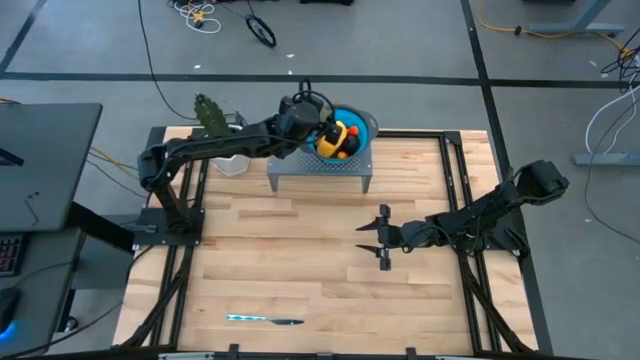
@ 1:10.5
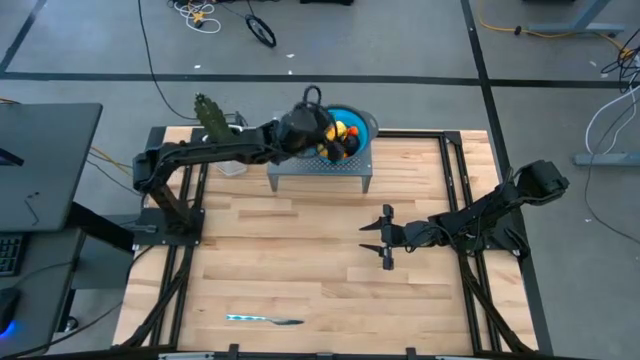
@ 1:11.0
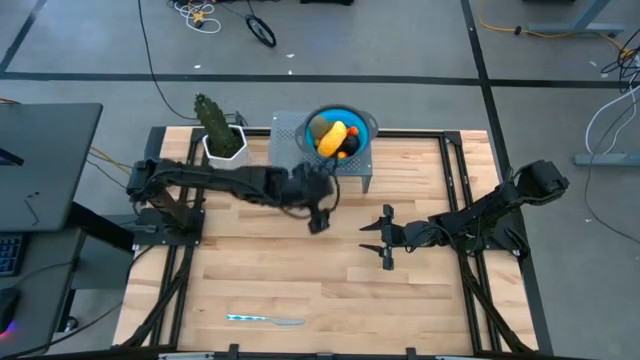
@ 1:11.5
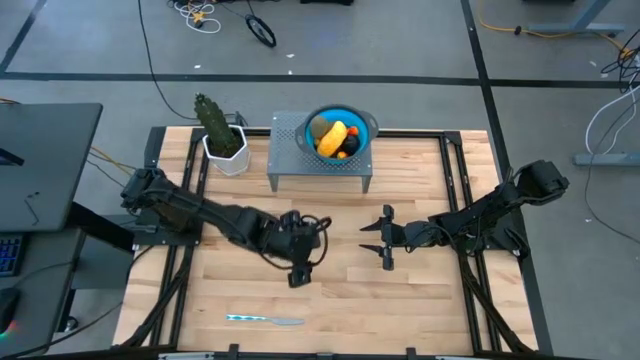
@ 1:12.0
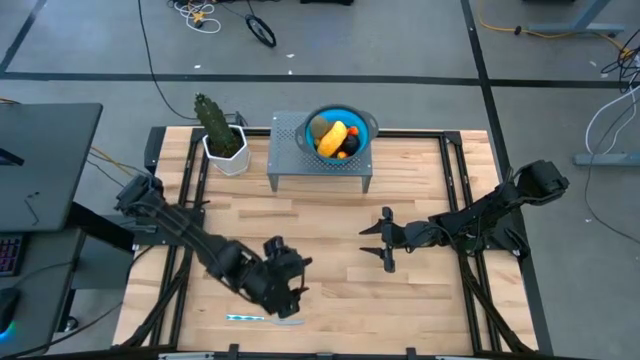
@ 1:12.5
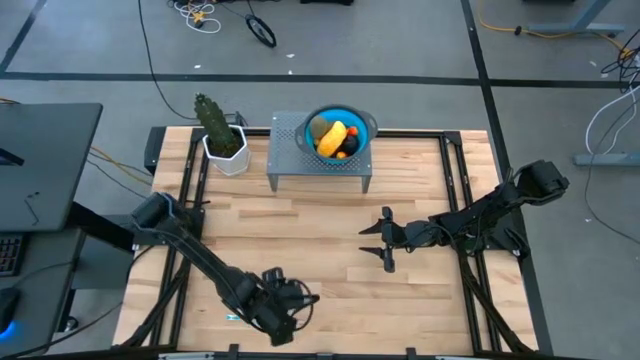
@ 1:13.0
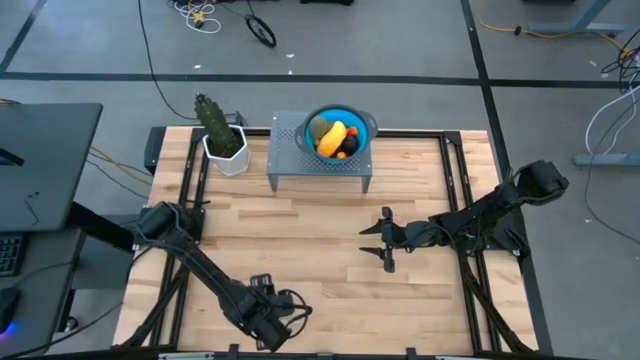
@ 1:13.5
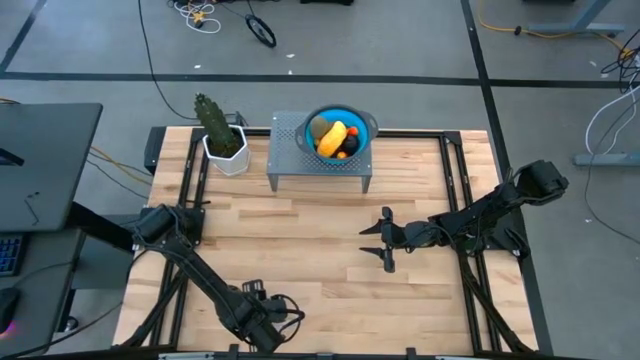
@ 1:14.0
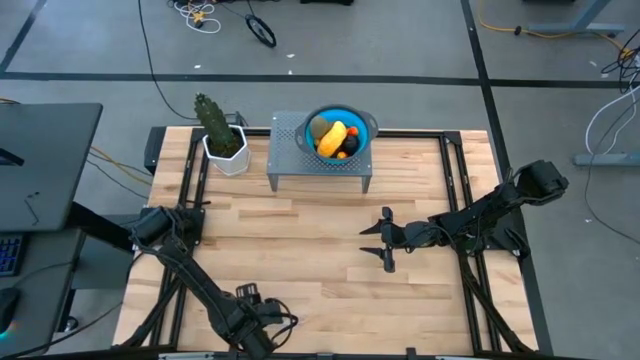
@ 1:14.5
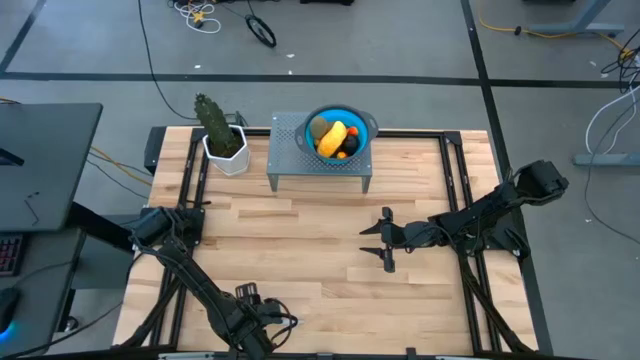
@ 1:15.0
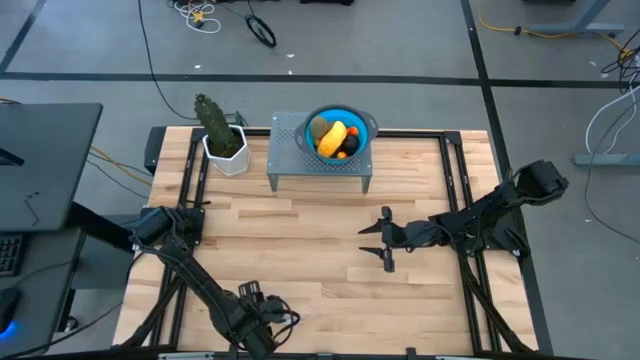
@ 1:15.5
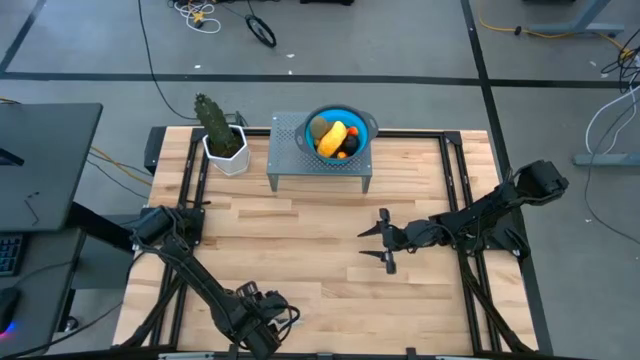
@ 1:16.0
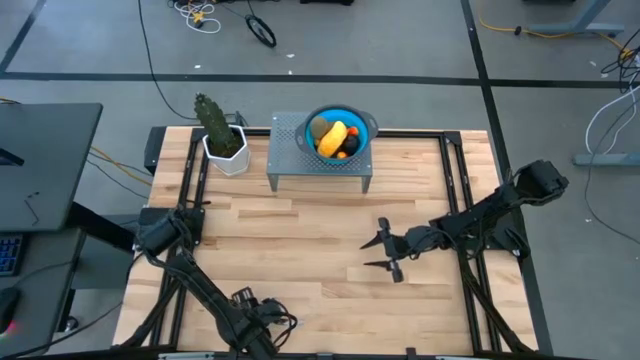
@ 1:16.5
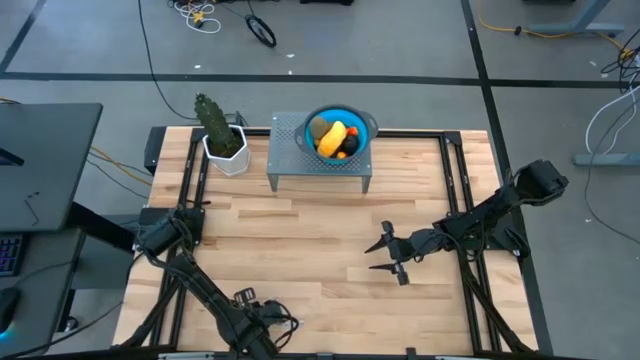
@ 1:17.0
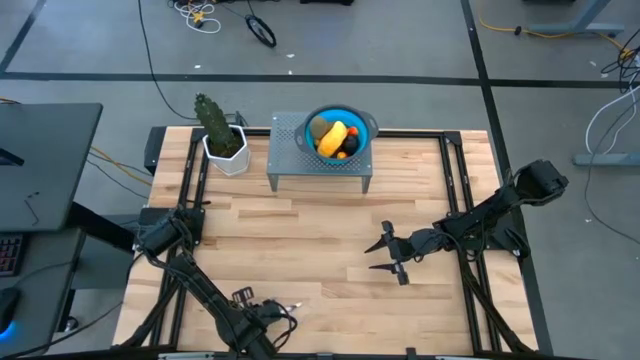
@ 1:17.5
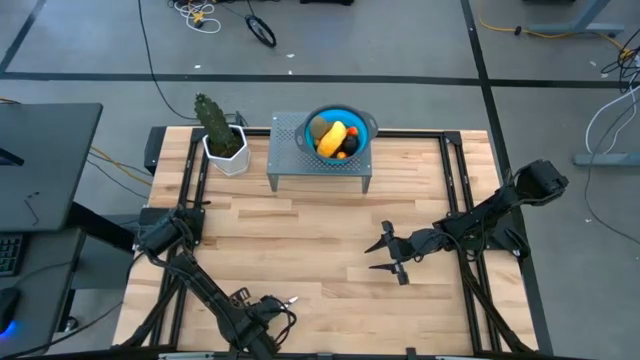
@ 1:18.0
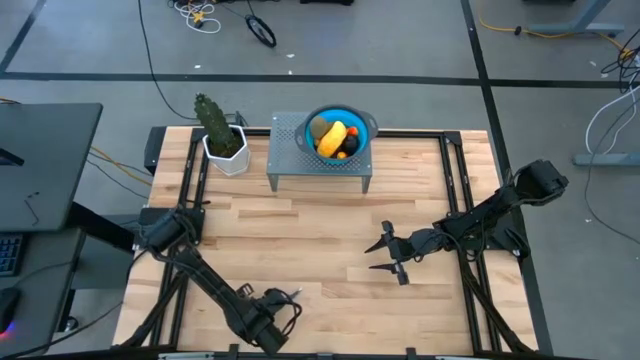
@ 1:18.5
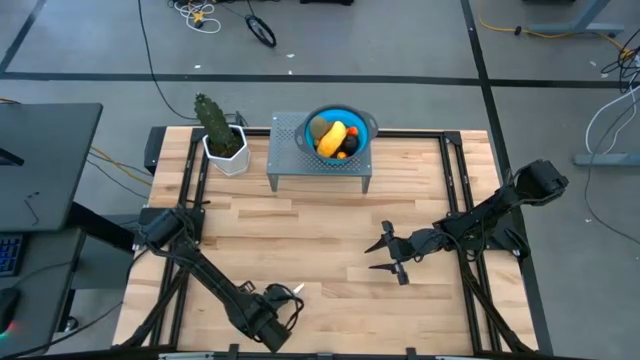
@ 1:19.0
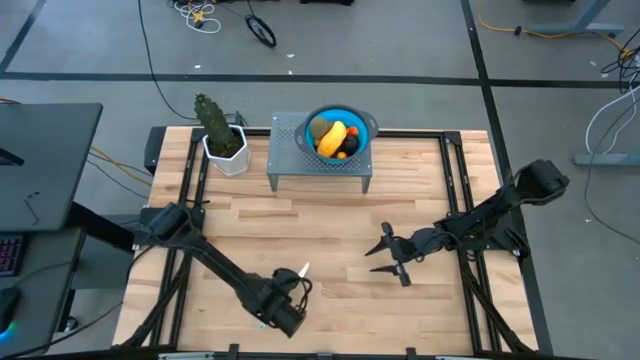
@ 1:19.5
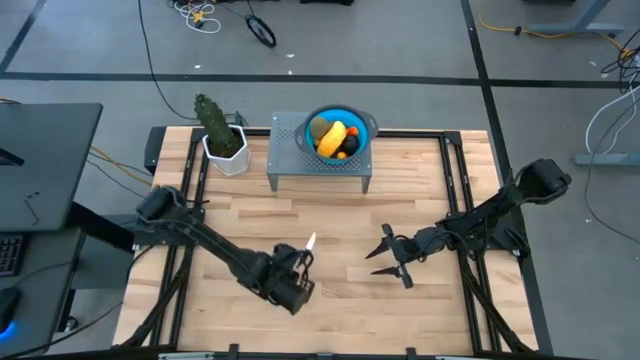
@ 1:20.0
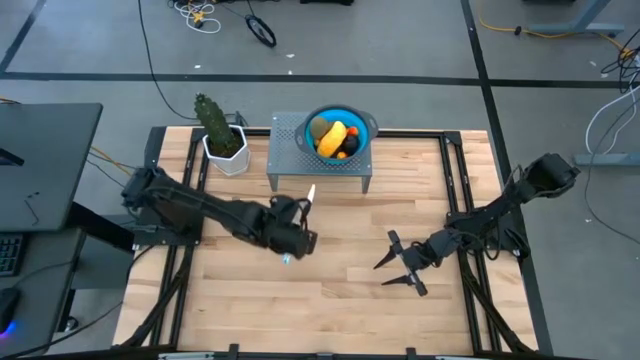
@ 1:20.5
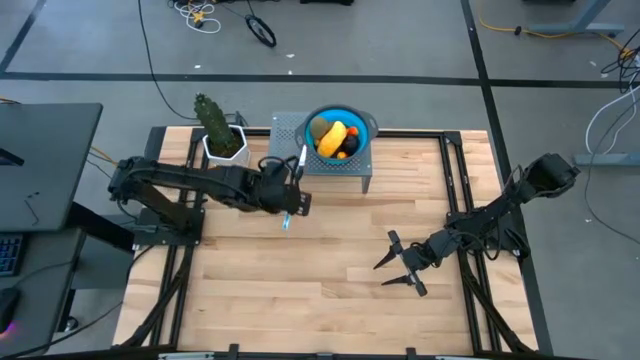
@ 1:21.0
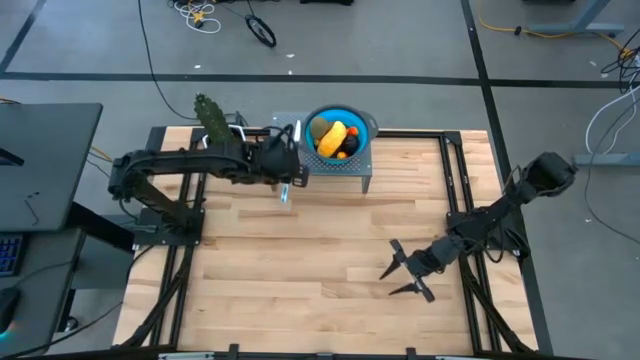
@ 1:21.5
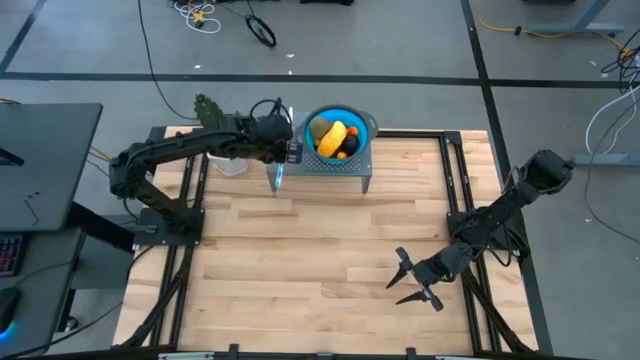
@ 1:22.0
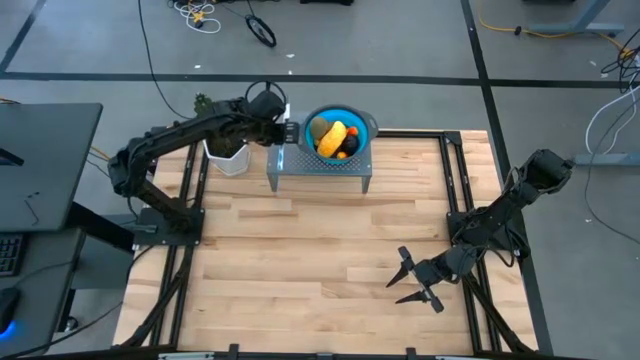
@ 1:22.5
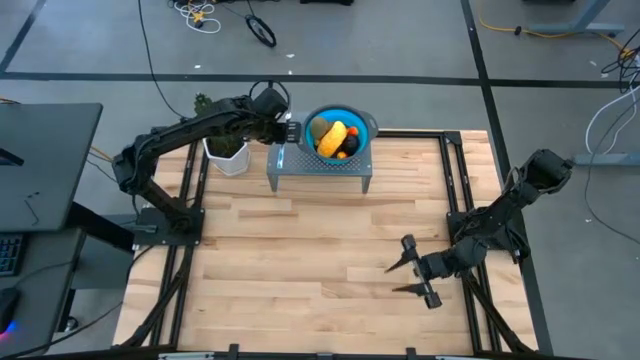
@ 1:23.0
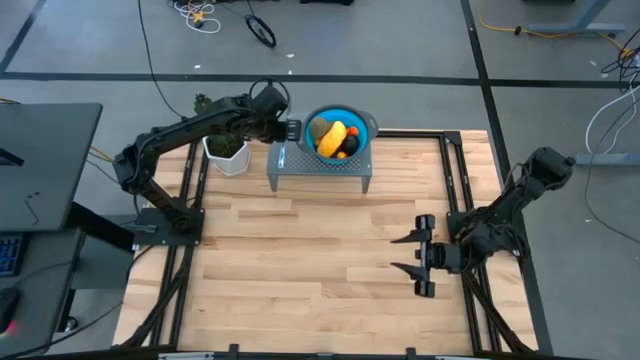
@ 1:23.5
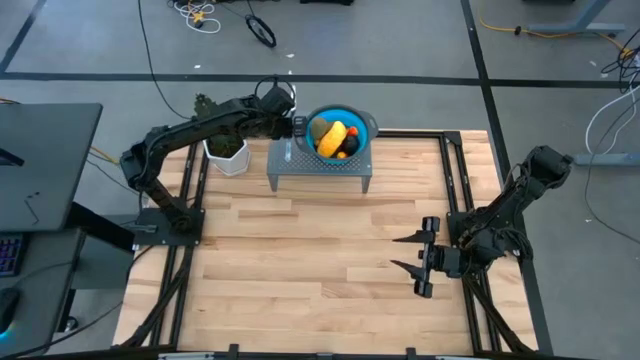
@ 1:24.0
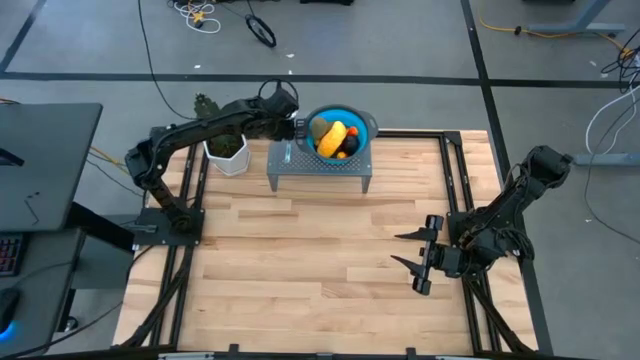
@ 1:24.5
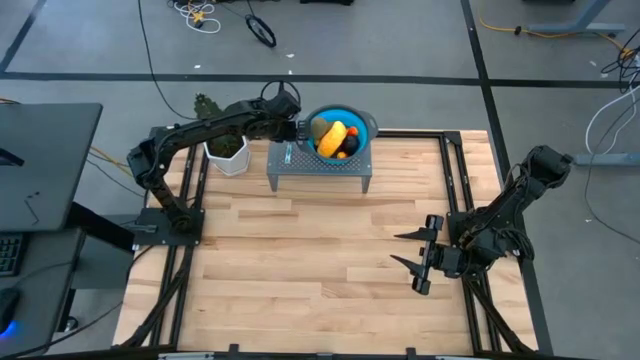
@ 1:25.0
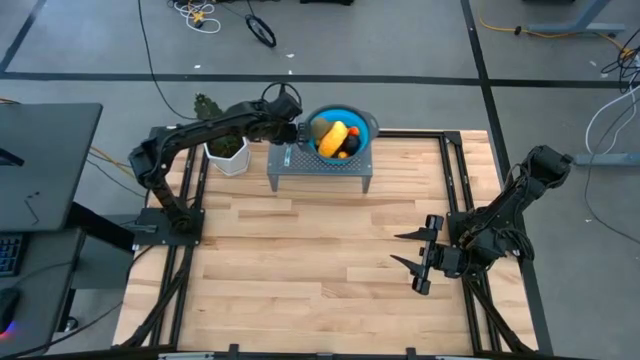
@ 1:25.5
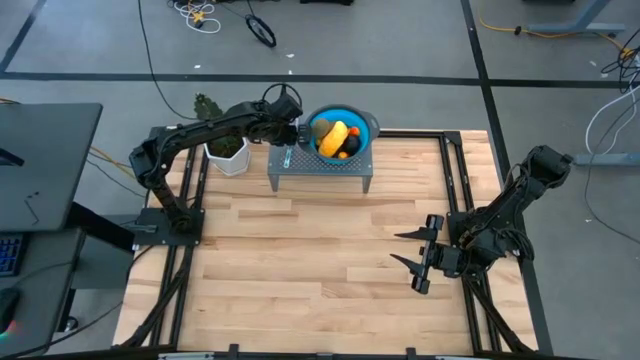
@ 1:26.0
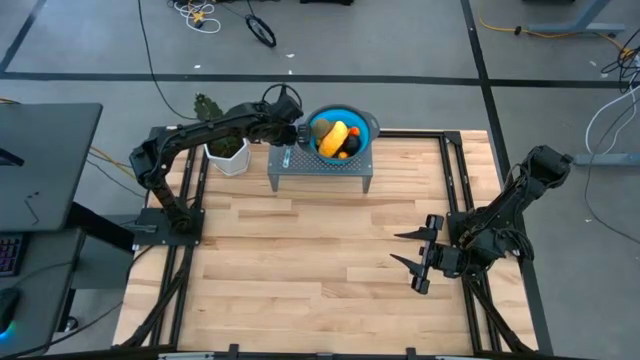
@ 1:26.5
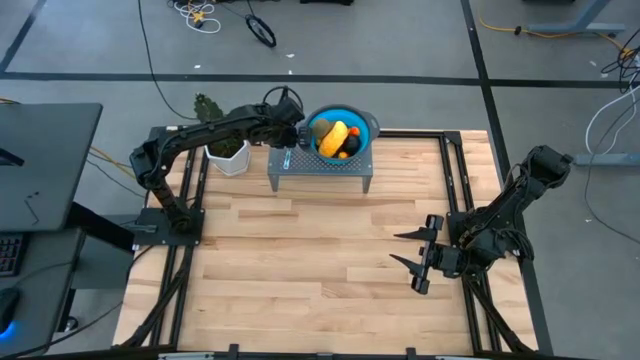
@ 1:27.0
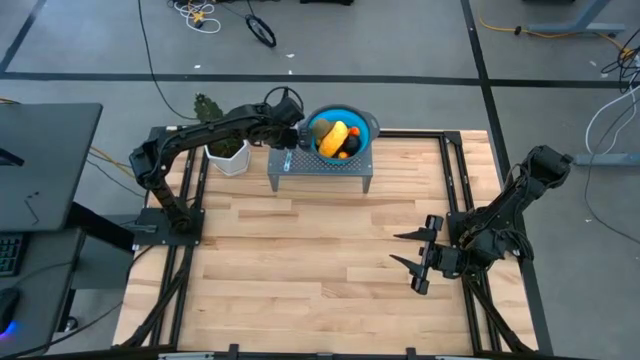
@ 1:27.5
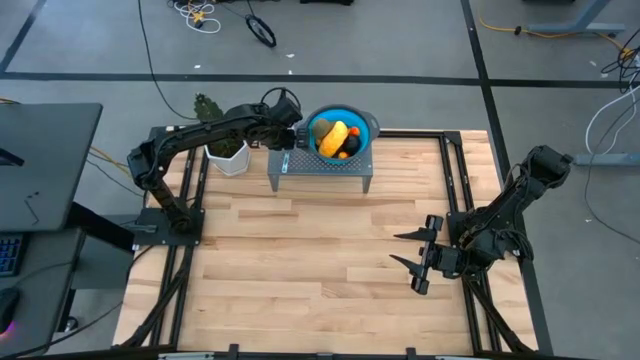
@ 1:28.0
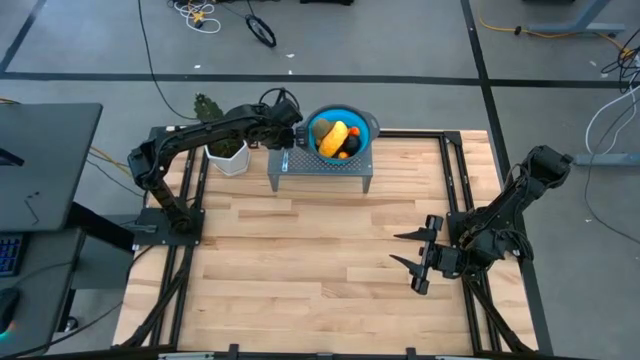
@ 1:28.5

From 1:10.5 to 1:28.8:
Task: Pick & Place Fruit
Put the blue table knife on the shelf

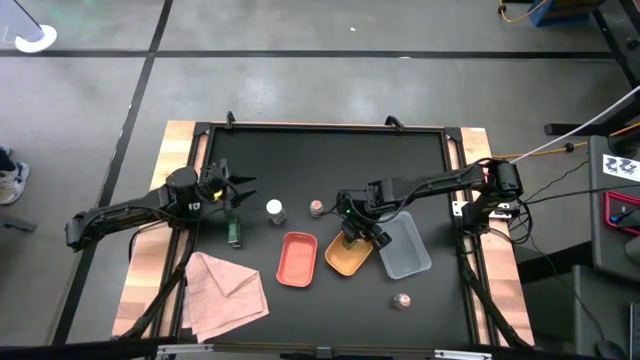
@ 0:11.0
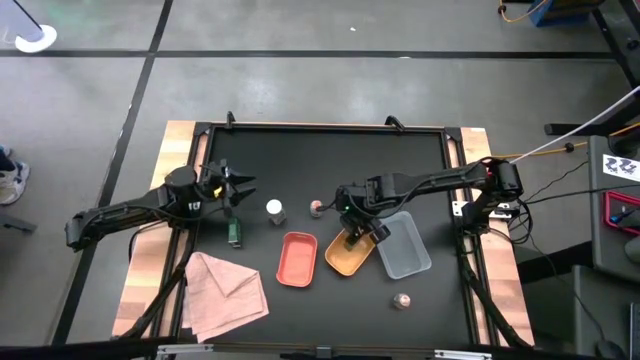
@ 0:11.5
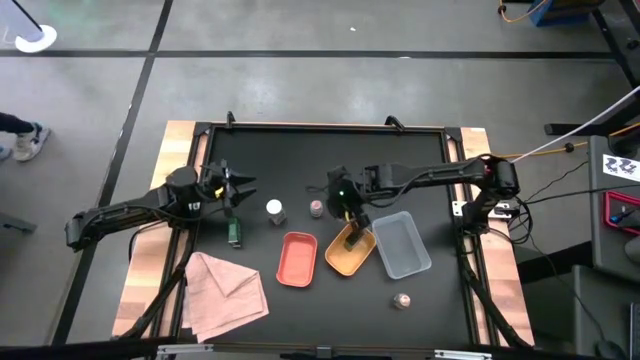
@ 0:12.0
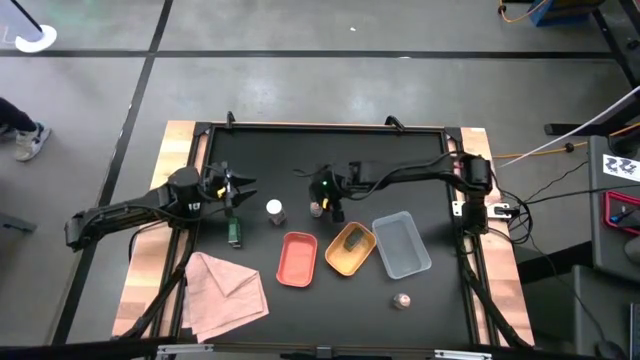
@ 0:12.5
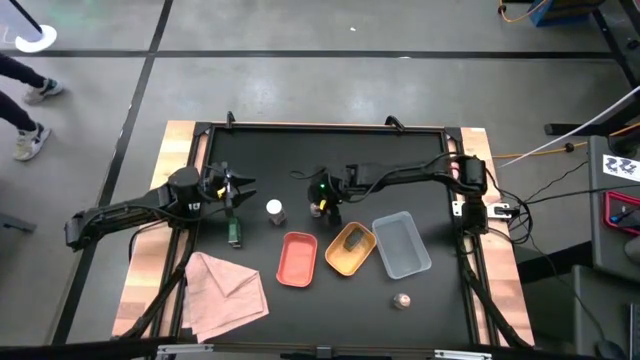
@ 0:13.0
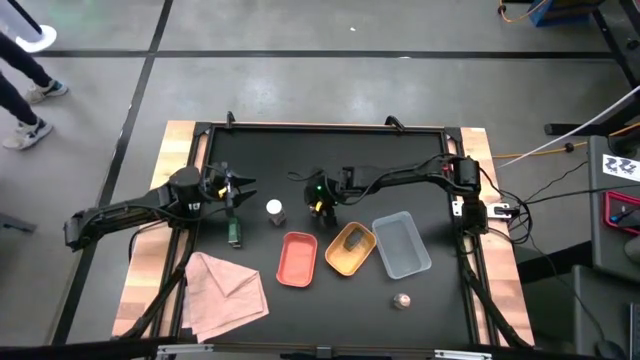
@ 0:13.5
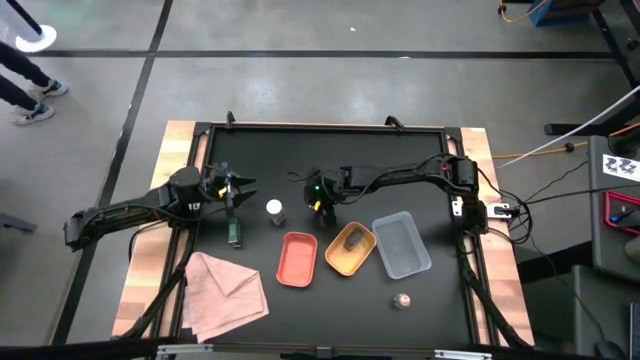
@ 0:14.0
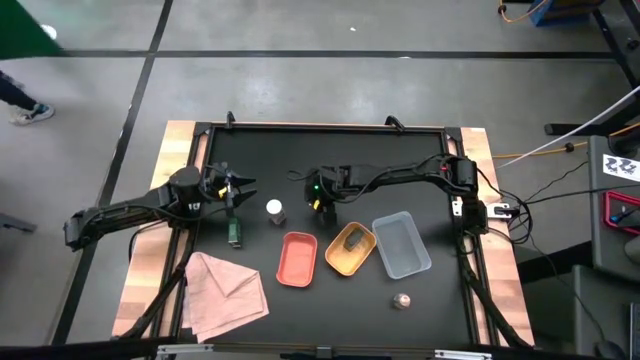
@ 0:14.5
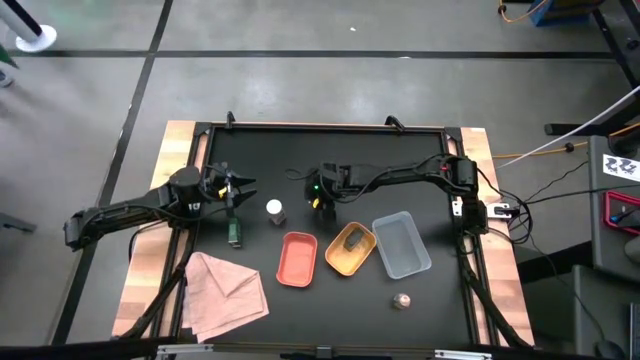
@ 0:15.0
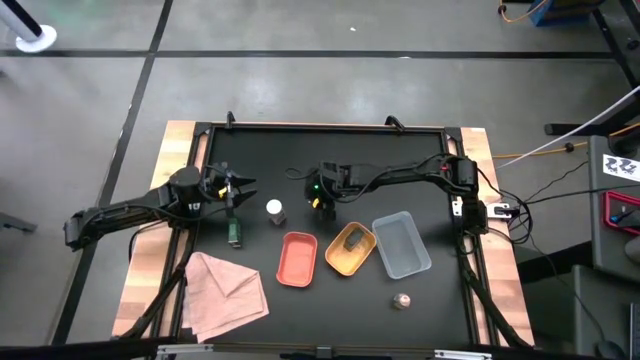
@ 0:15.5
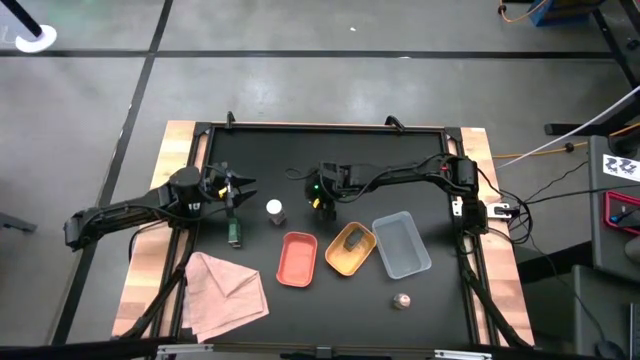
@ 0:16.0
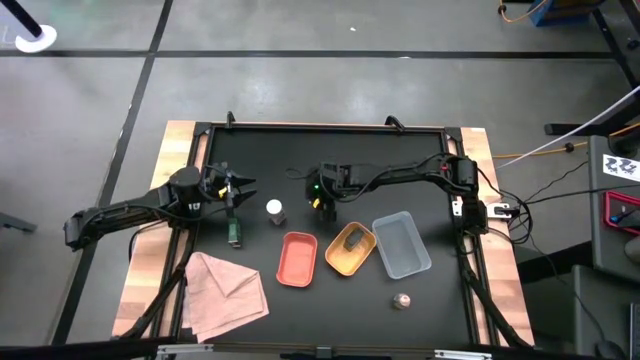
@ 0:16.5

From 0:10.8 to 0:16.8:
Task: Sort spices by type
Put the top brown spice bottle into the transparent bin
